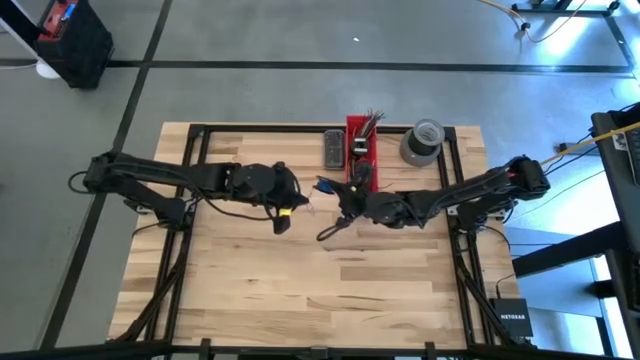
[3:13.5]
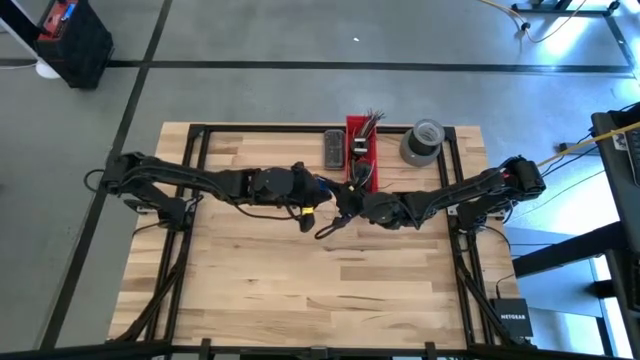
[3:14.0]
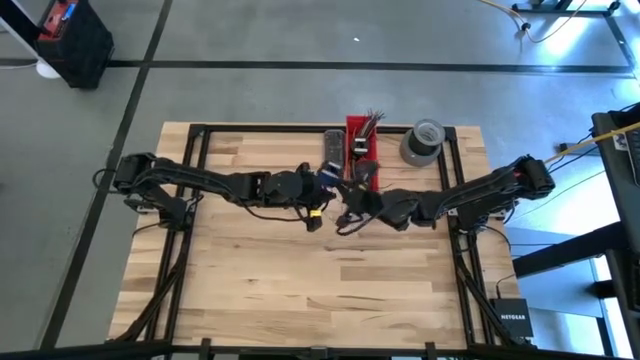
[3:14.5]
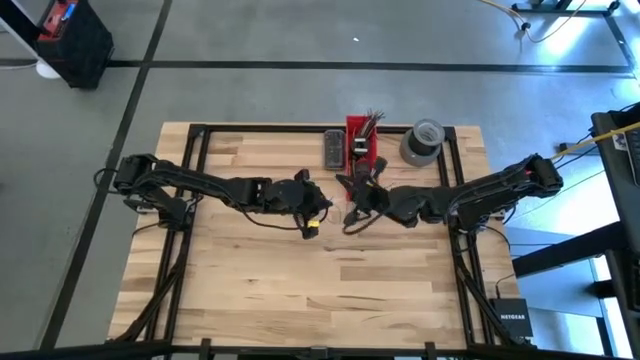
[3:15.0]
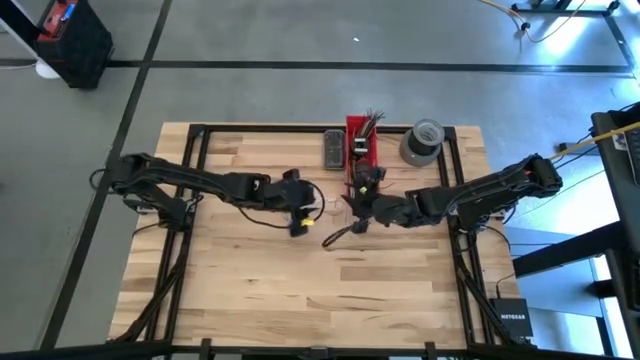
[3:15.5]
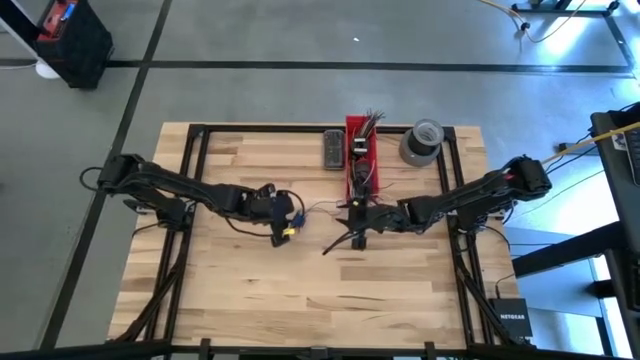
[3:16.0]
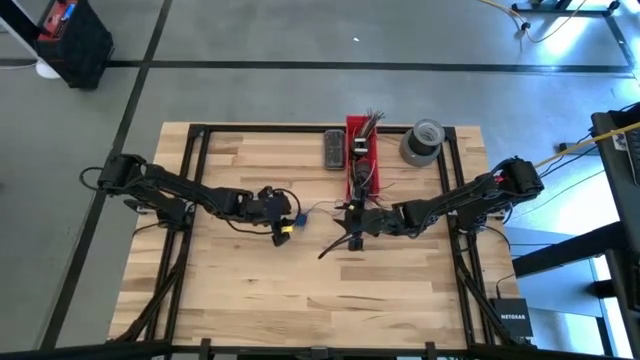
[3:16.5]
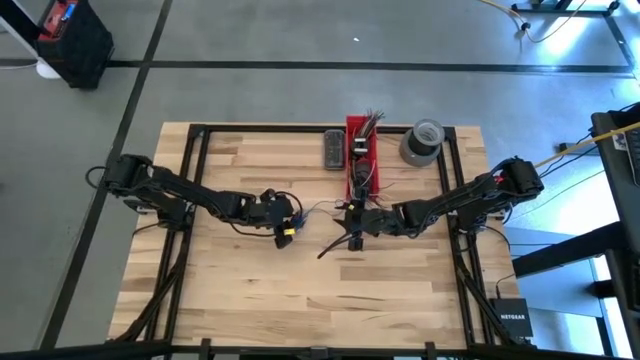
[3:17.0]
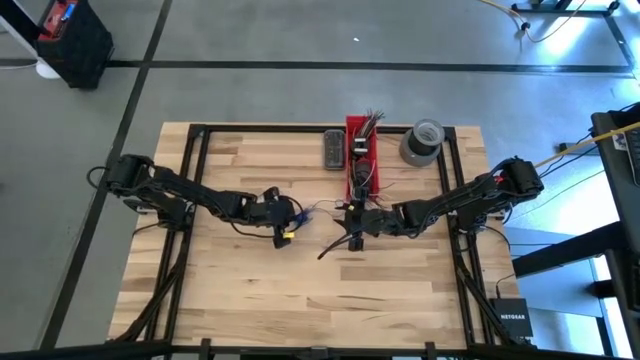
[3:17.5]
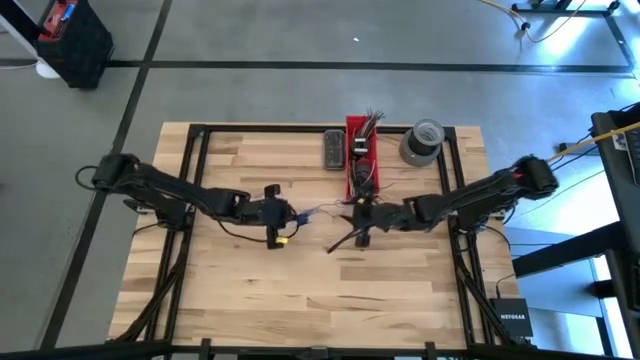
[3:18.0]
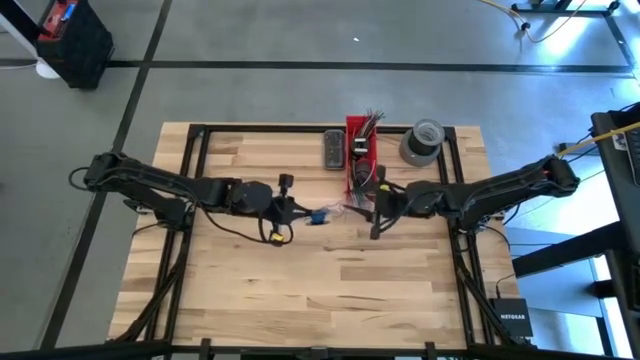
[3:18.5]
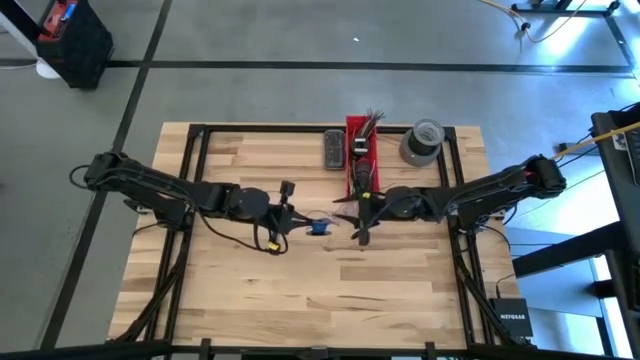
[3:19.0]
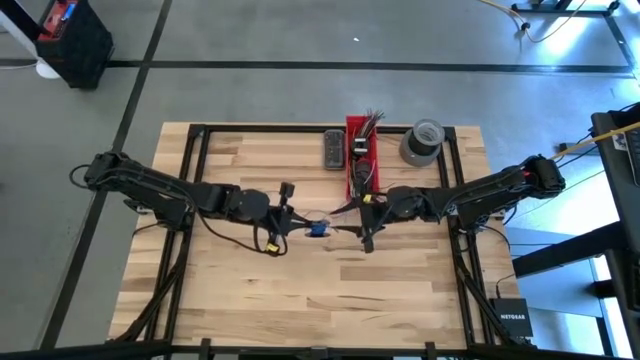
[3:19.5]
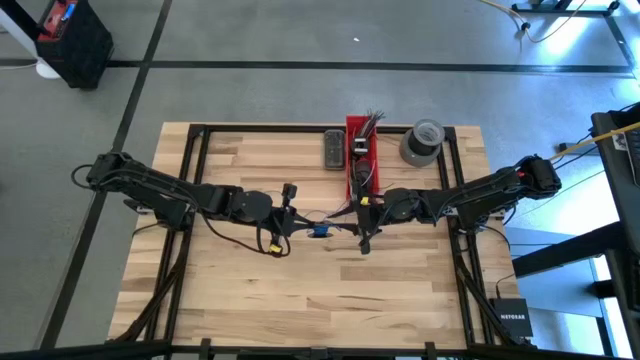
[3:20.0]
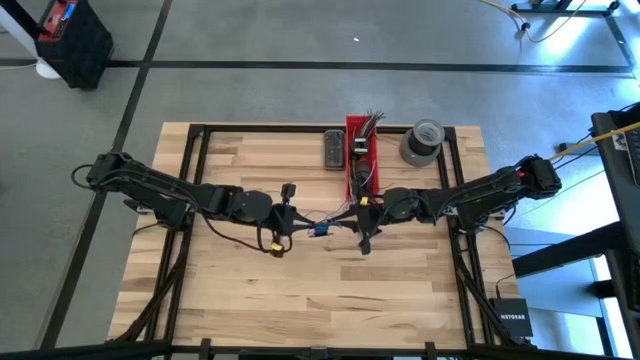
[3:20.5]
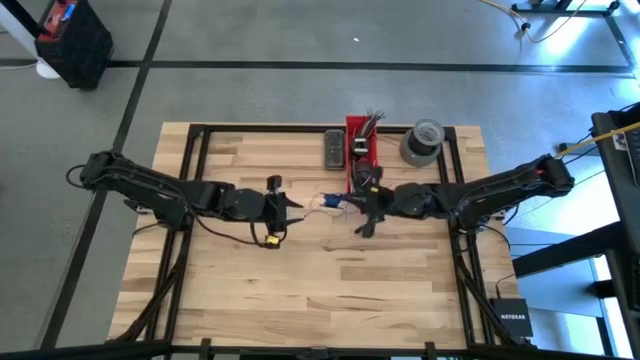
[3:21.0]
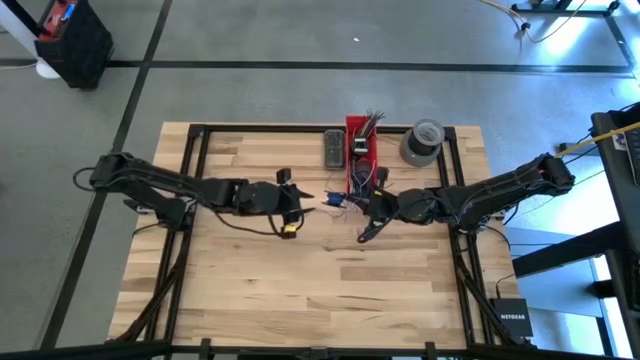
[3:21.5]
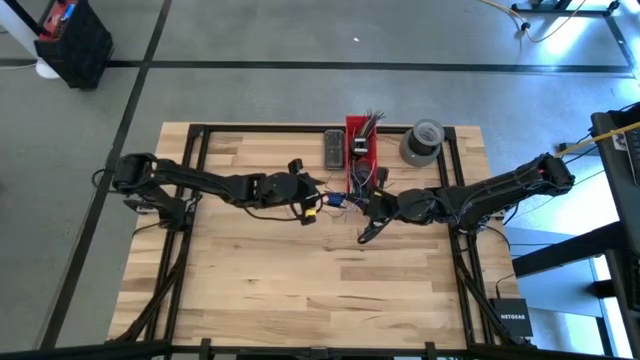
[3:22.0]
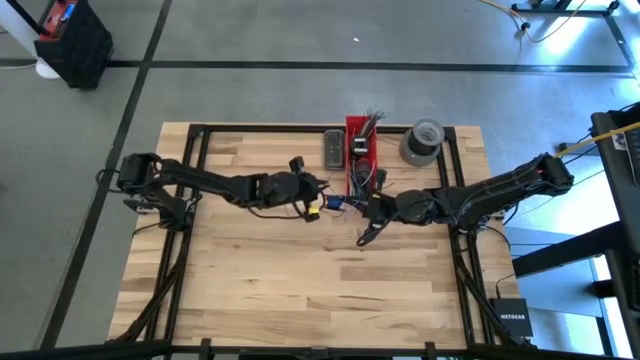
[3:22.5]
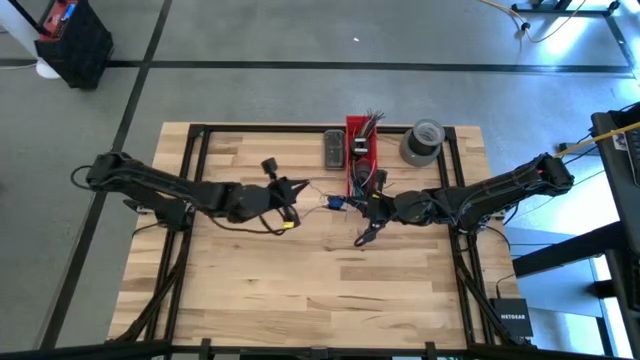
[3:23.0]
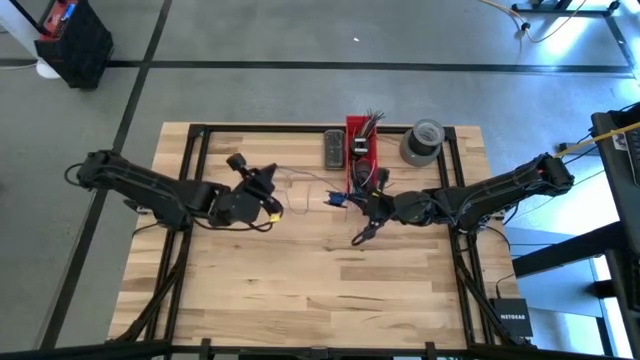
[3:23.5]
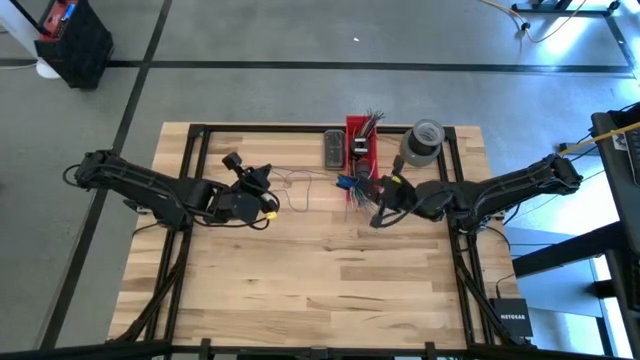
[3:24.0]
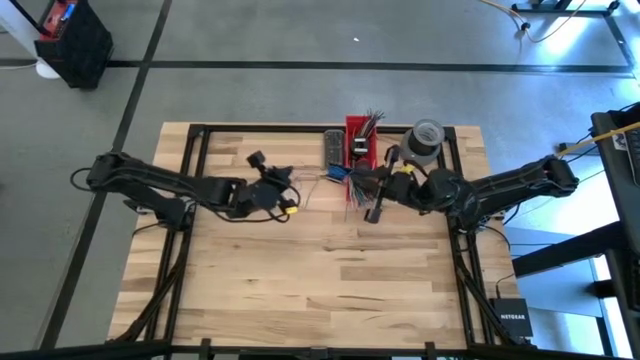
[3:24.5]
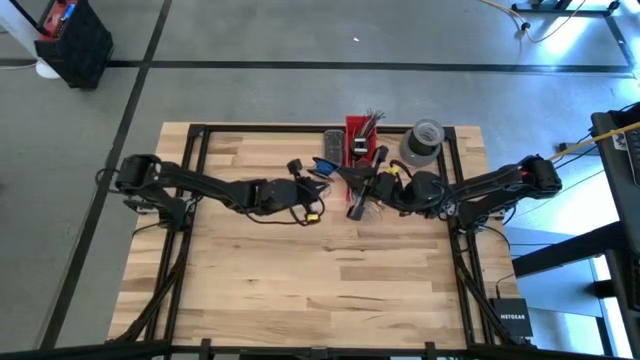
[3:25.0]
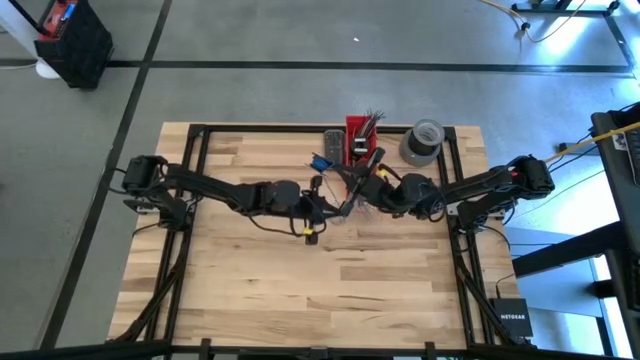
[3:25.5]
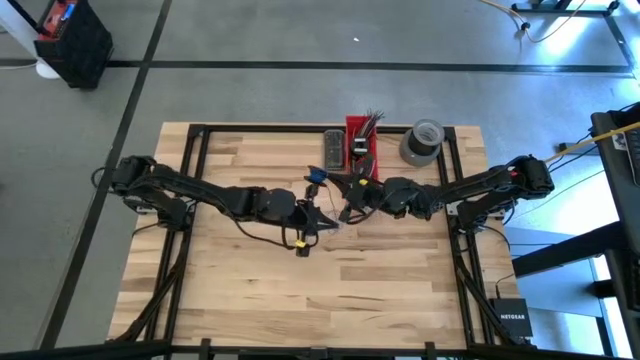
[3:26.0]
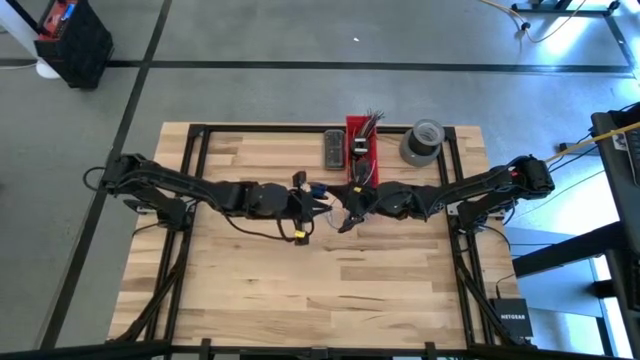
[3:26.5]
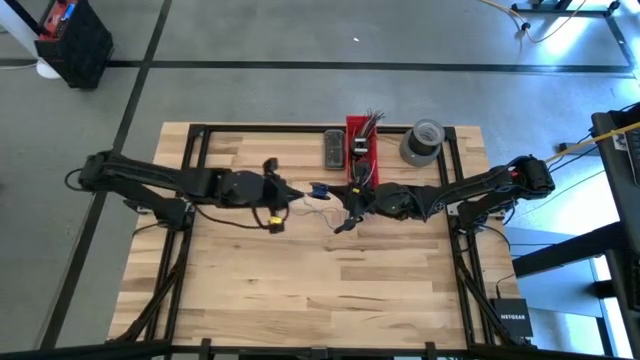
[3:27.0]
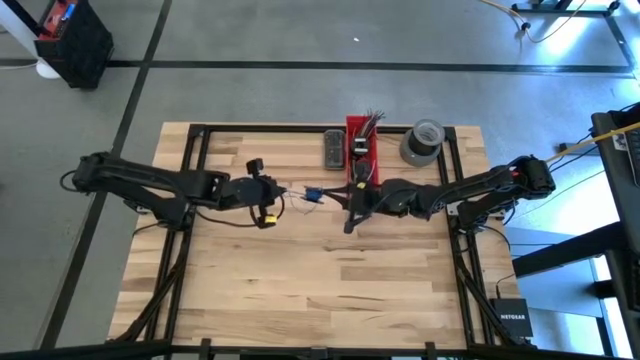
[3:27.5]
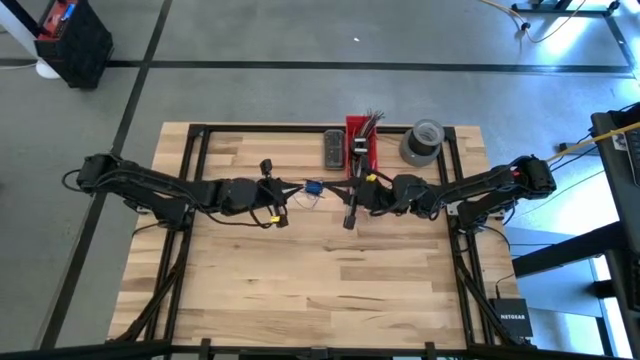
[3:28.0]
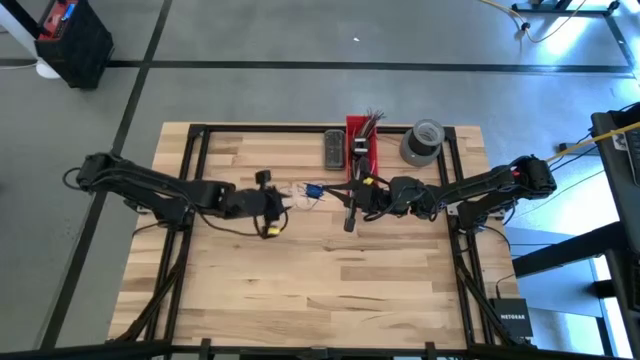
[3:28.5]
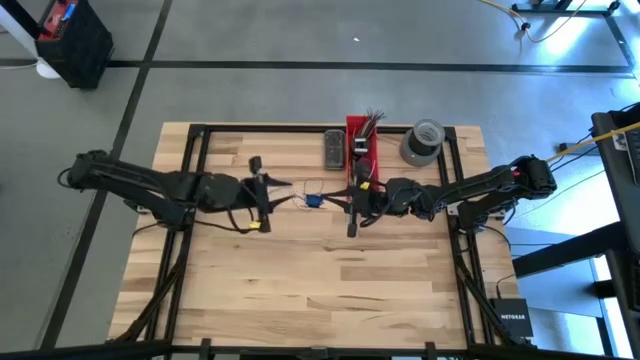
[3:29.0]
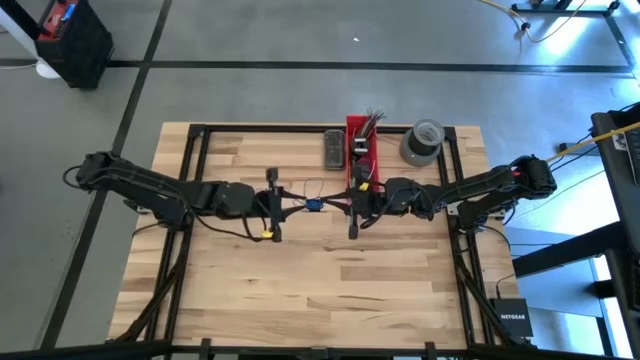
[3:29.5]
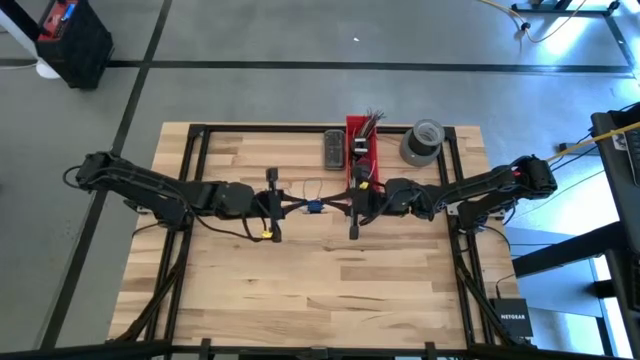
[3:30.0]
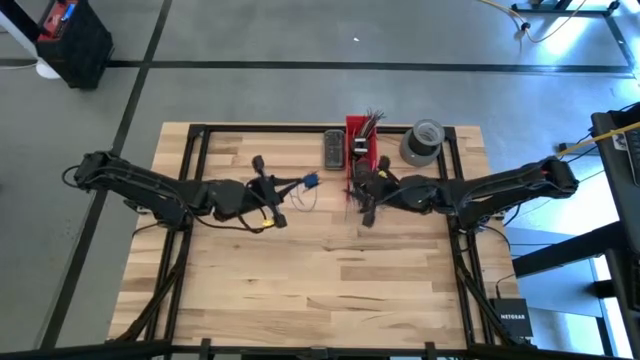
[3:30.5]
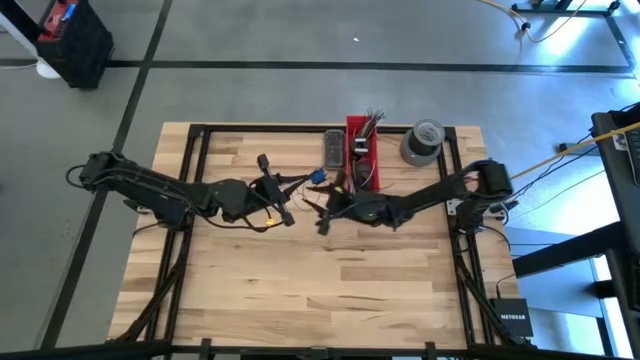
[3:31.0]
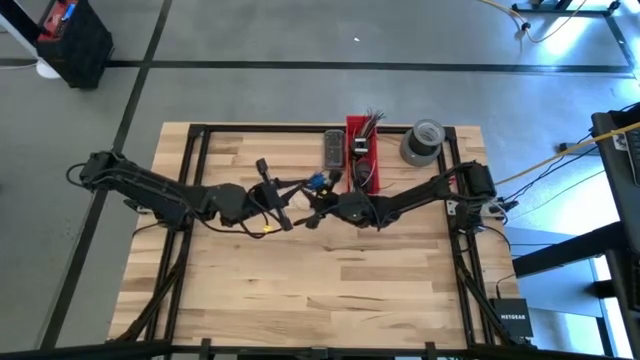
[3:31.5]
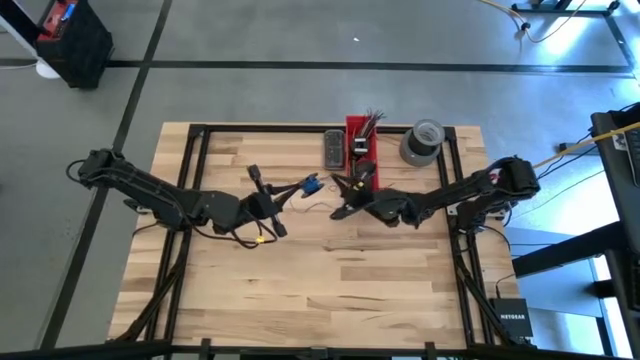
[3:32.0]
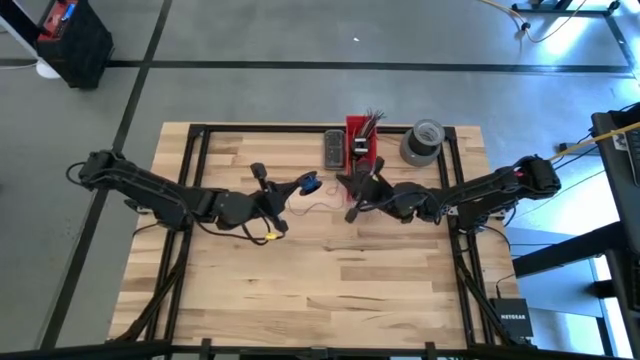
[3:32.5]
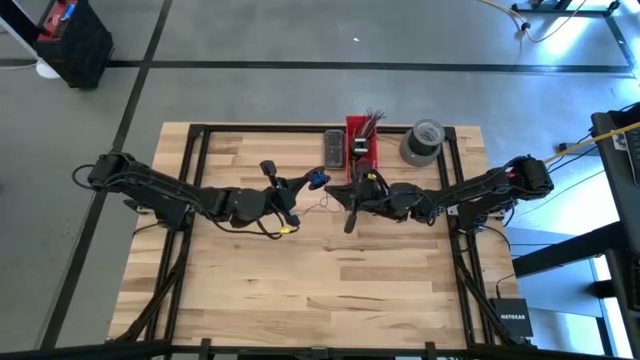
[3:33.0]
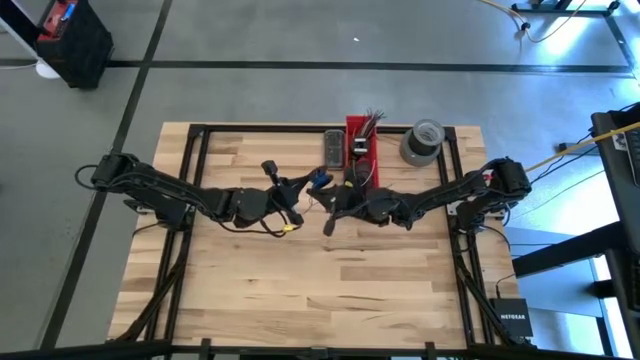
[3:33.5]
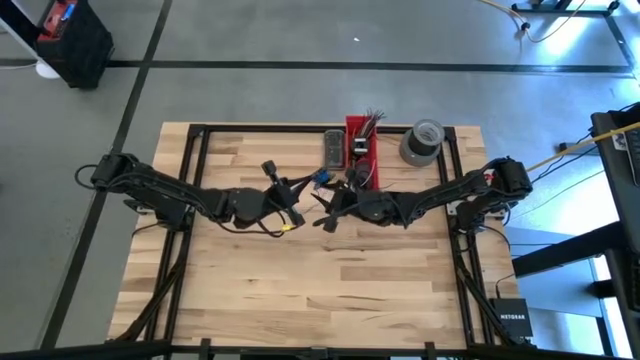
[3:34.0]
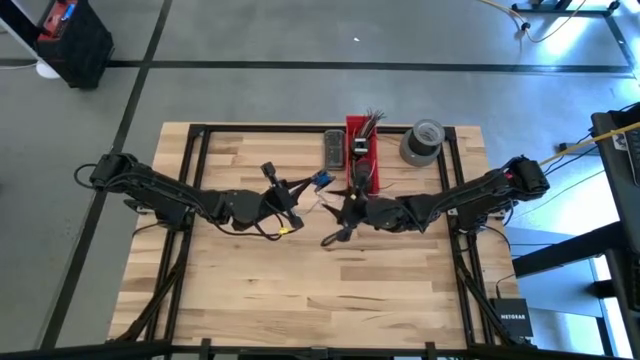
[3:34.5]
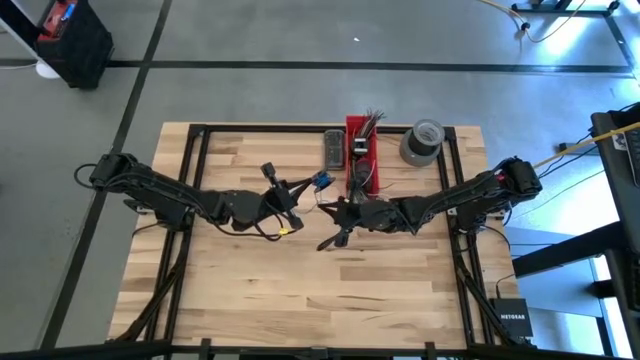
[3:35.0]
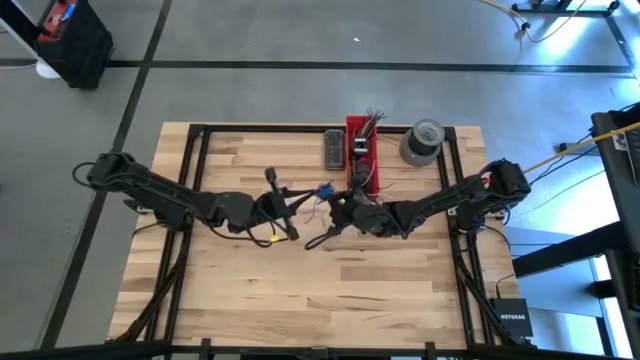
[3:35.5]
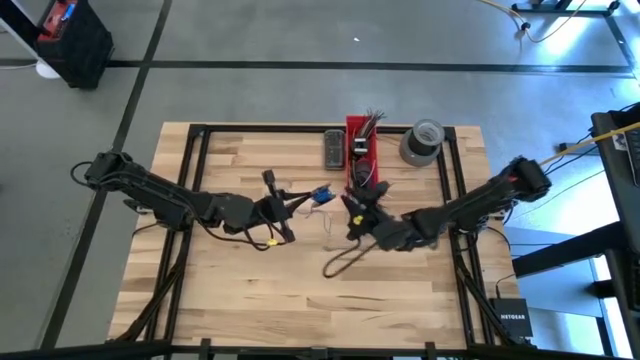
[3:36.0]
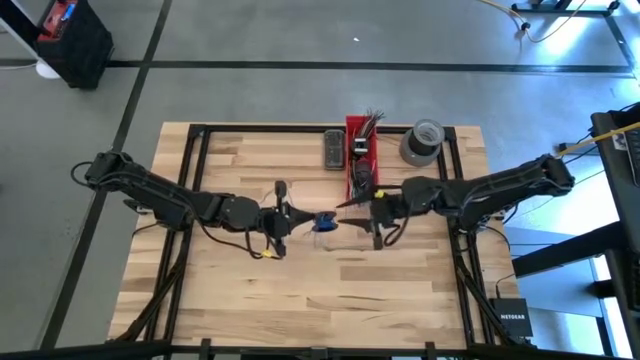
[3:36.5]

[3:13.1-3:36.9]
Task: Coil cords
Coil the blue wire into the black spool
